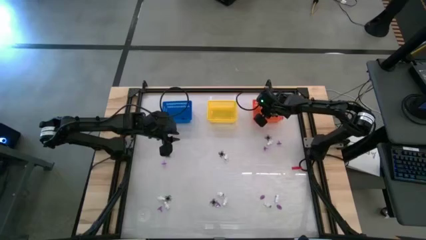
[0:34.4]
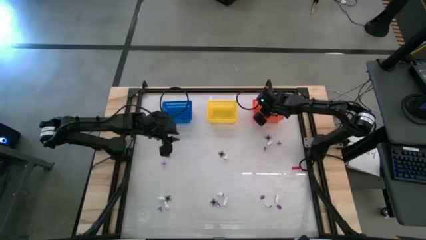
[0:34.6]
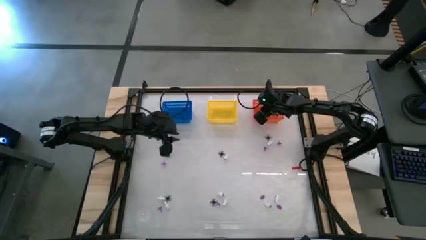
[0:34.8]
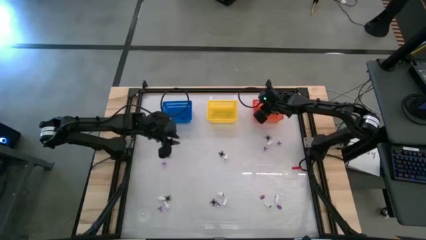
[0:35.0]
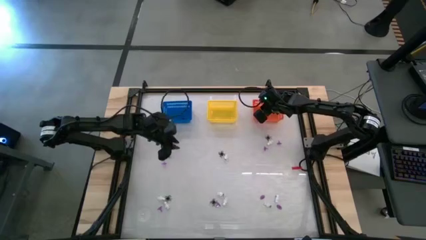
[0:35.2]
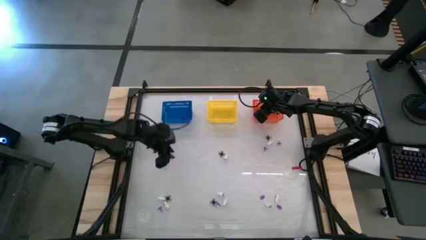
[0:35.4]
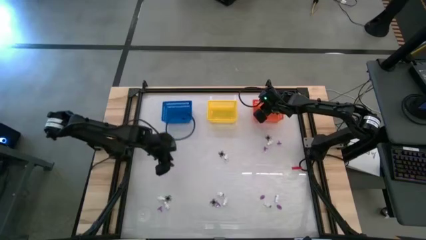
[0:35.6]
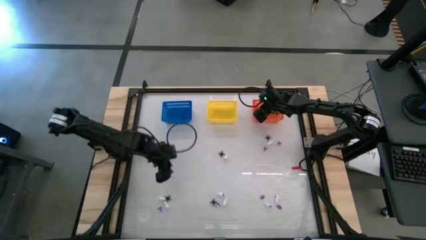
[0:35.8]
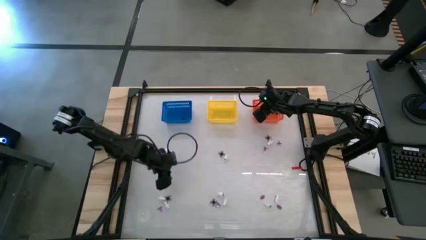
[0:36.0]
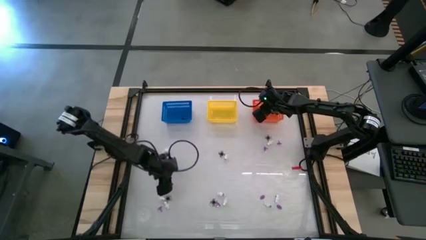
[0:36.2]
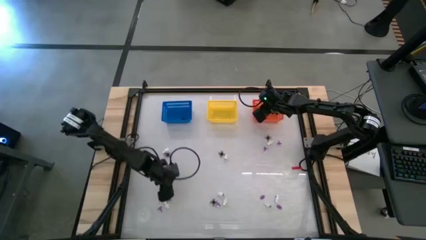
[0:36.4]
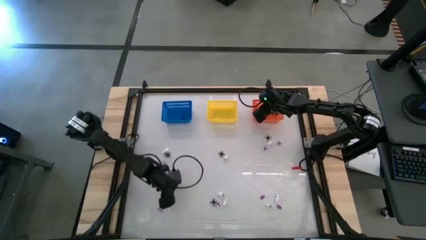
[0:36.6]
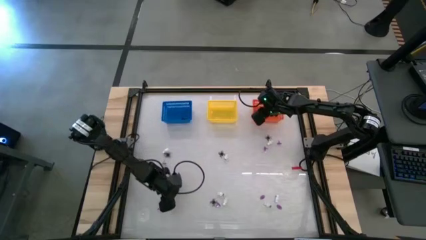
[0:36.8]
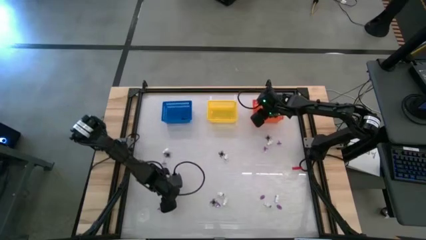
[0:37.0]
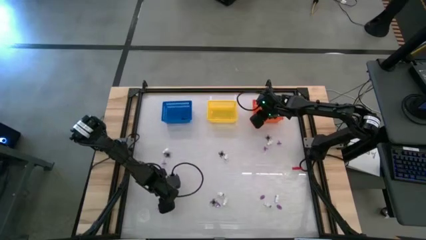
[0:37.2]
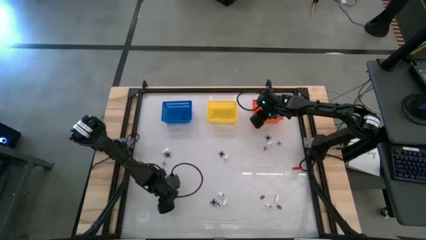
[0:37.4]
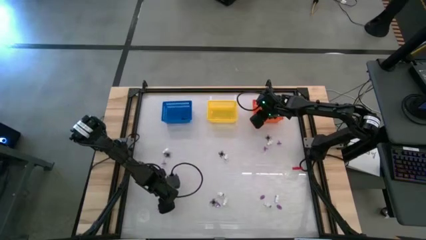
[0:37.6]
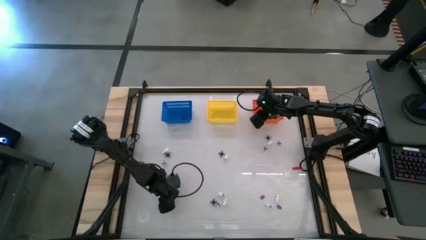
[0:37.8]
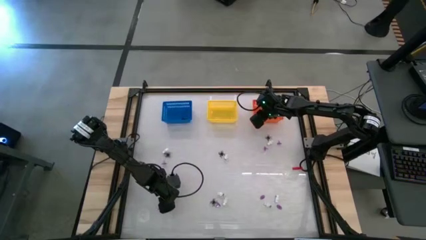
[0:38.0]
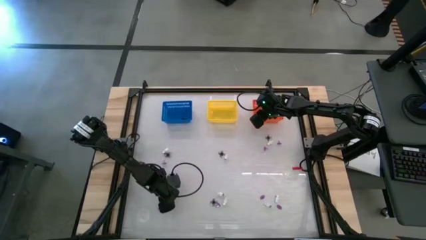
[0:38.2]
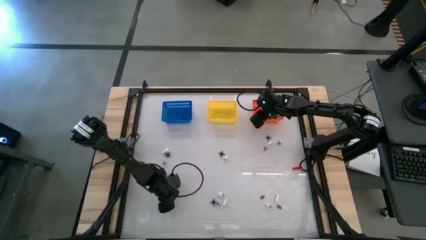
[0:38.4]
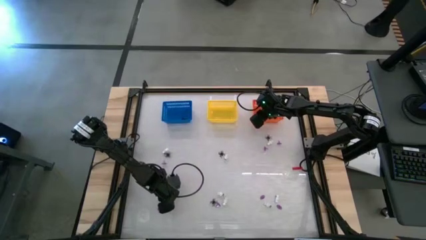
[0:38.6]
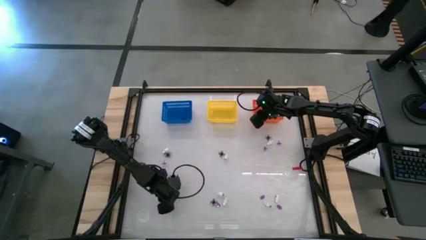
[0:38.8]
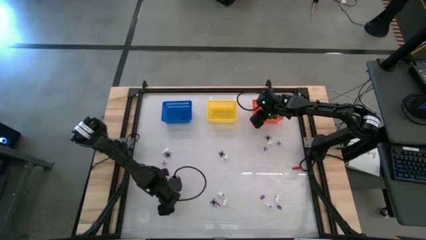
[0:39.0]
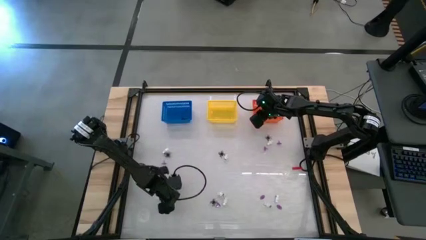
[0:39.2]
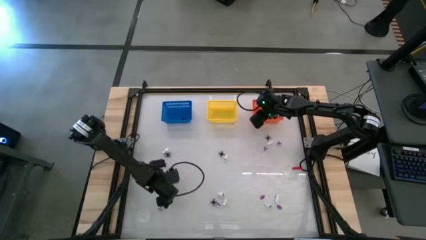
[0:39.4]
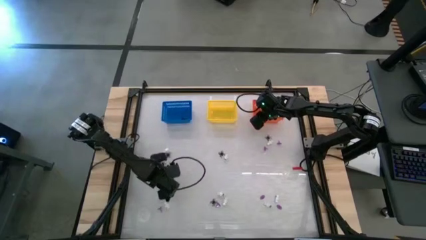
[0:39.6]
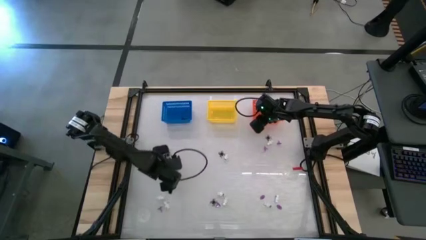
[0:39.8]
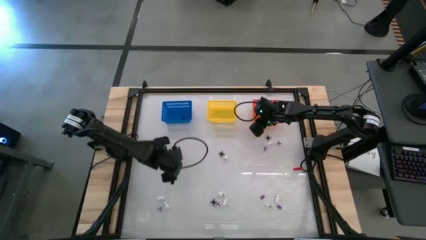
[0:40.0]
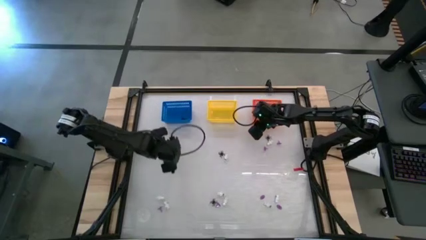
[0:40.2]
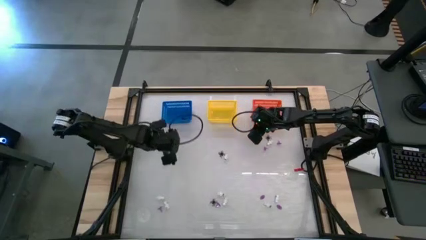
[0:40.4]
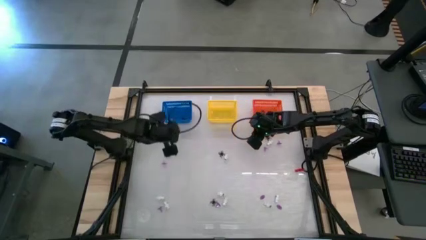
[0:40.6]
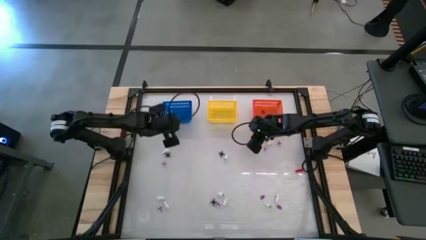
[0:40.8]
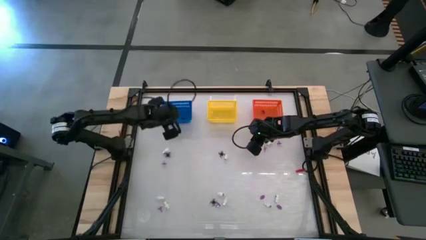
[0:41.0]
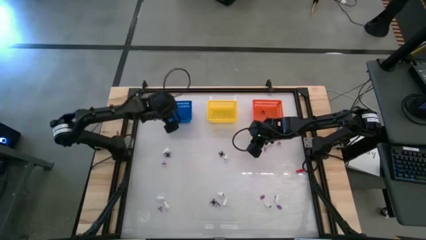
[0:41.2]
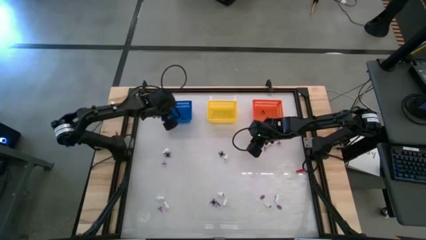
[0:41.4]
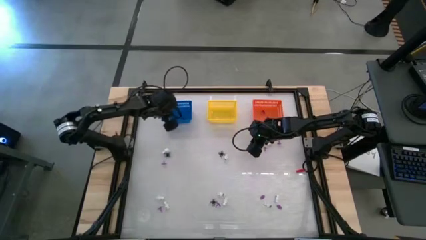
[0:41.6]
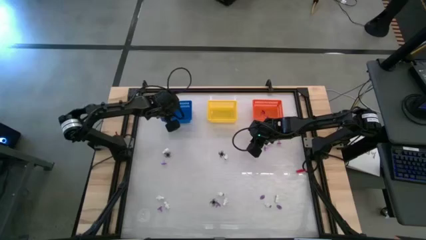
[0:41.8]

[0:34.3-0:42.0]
Task: Sort Halloween decoration
Put the black spider toy into the blue basket

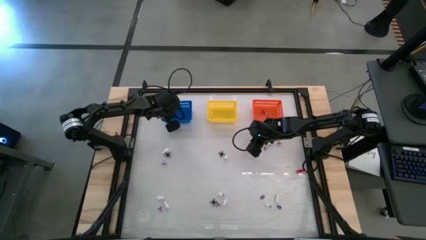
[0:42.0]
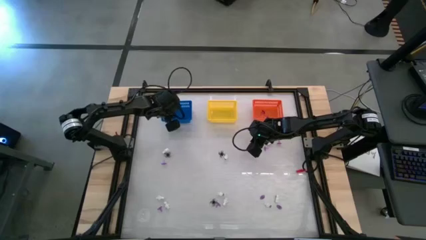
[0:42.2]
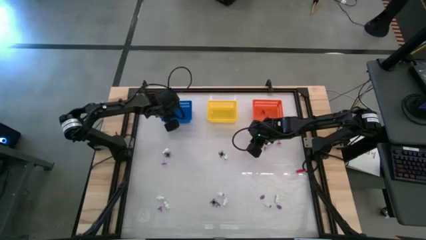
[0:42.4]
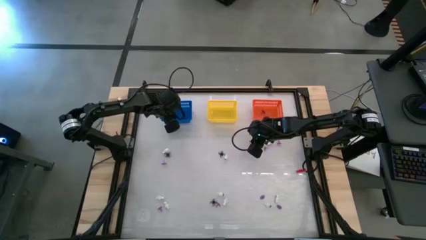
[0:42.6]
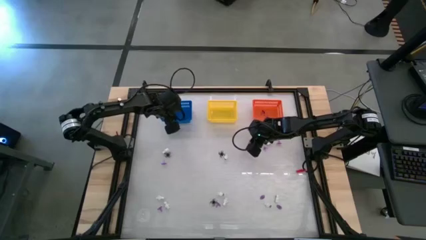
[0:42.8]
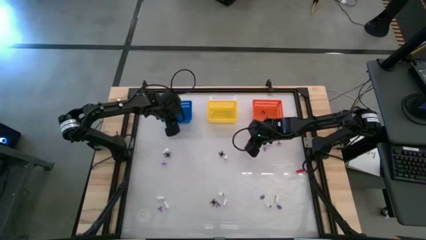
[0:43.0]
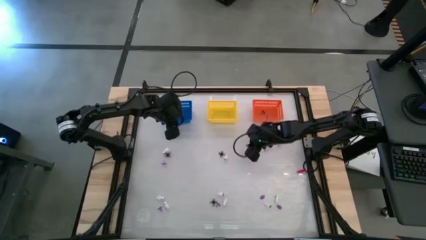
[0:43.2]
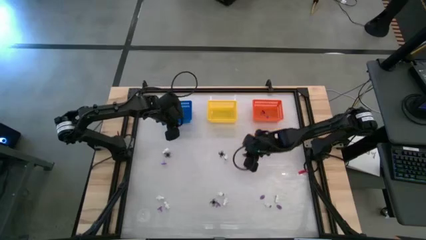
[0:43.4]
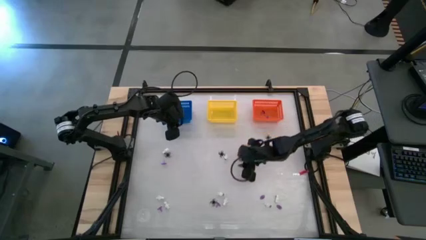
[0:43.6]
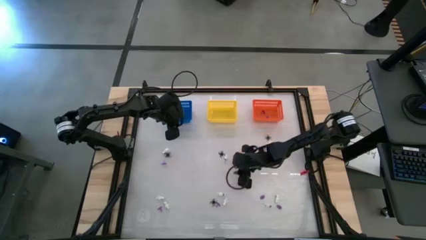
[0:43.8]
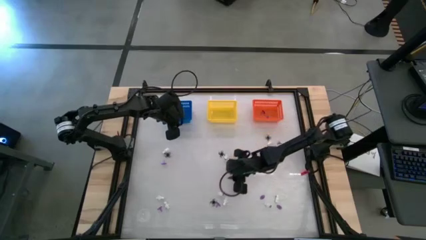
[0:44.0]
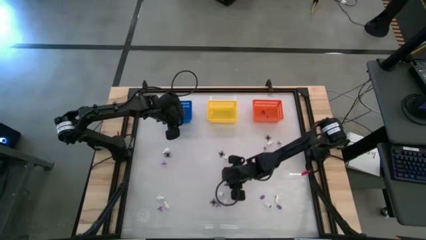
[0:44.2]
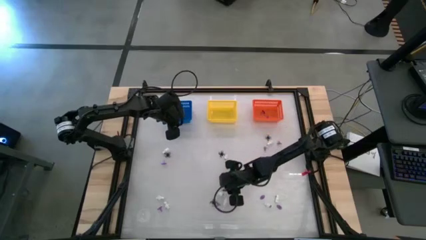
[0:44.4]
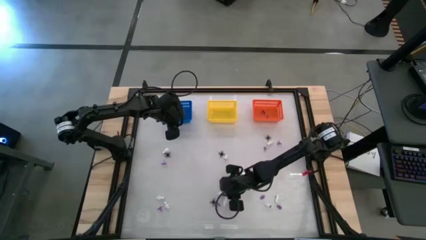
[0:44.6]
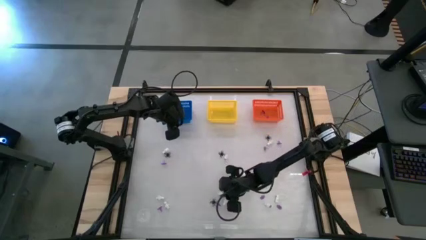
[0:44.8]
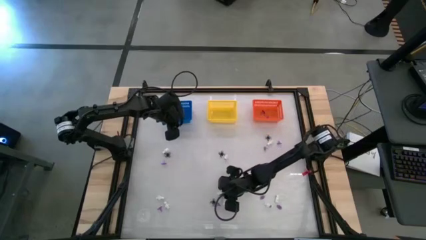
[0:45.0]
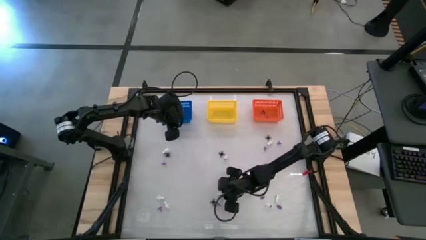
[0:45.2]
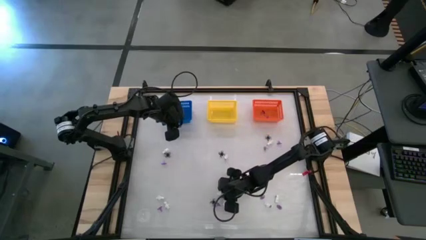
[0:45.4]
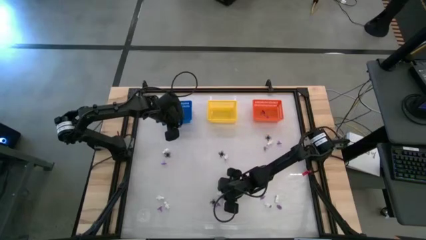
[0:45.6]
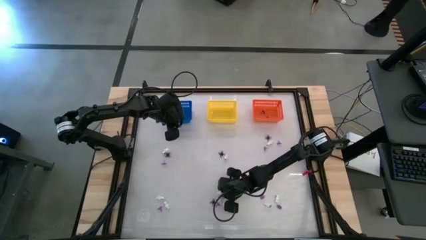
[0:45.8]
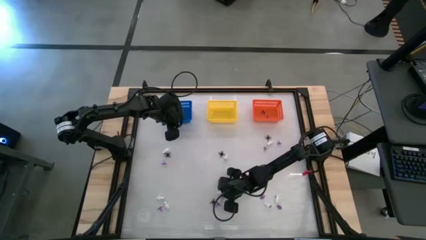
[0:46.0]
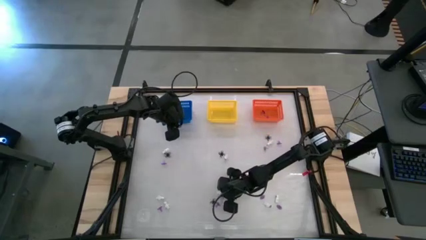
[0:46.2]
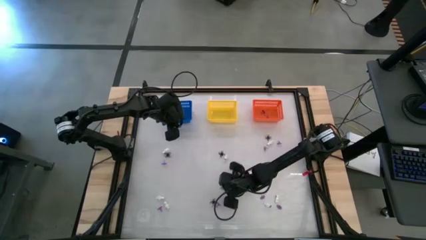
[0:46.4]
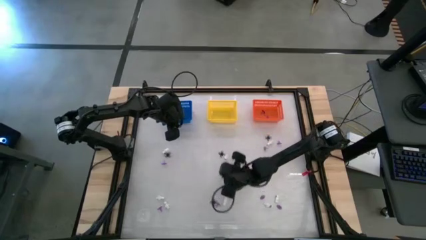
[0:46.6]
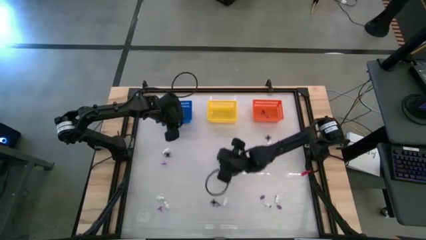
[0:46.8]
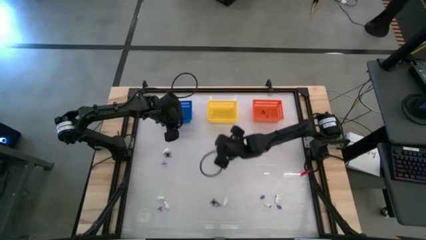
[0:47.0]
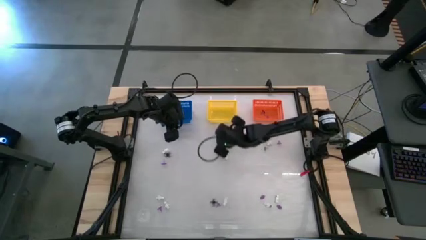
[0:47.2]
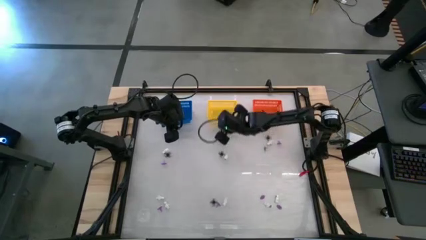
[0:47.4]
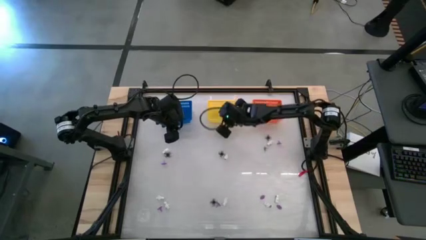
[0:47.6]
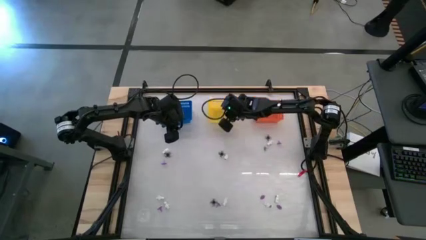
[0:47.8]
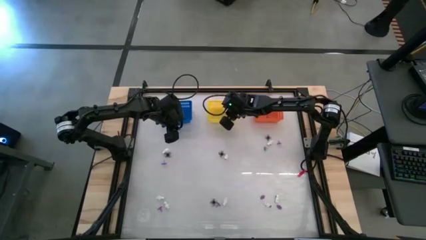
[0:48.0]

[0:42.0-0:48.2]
Put the white skeleton toy into the yellow basket

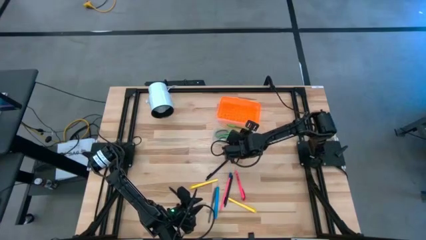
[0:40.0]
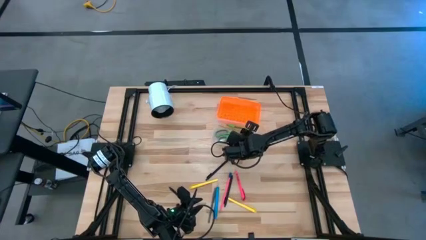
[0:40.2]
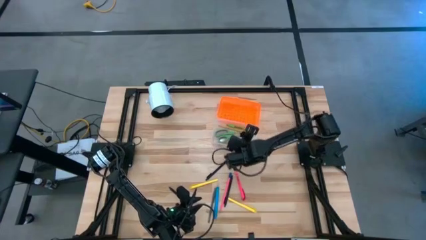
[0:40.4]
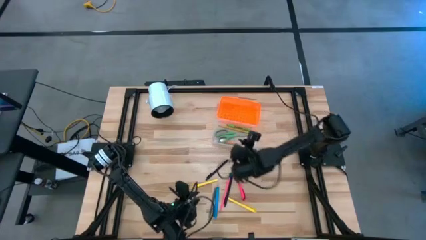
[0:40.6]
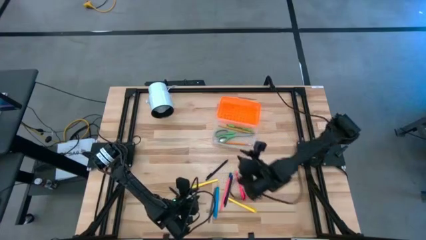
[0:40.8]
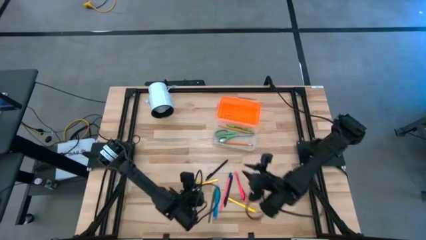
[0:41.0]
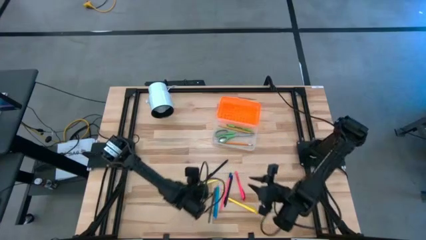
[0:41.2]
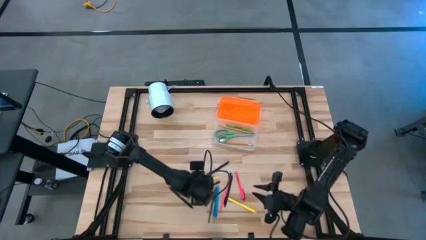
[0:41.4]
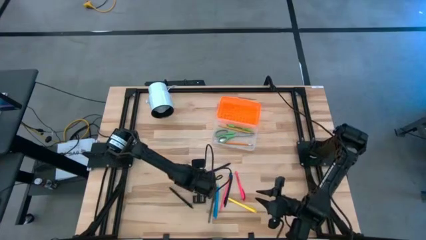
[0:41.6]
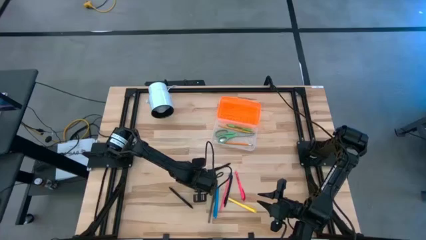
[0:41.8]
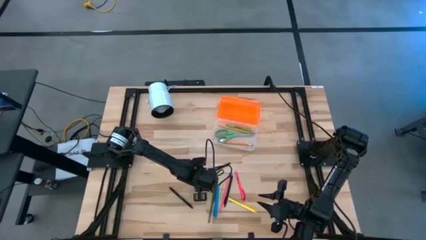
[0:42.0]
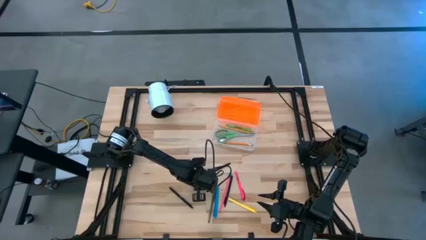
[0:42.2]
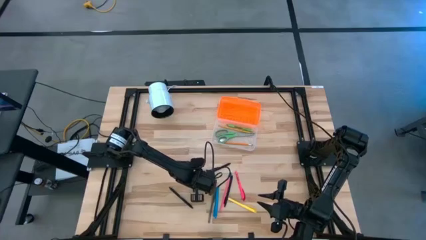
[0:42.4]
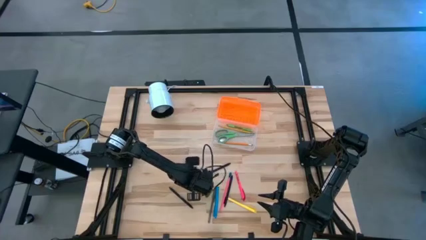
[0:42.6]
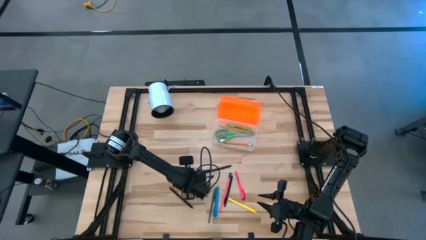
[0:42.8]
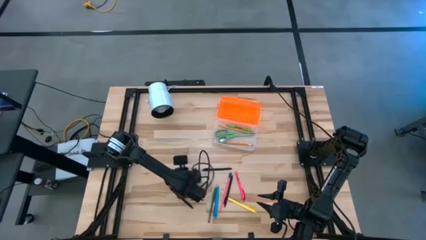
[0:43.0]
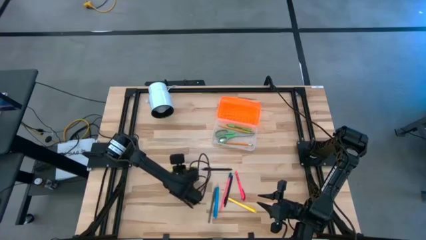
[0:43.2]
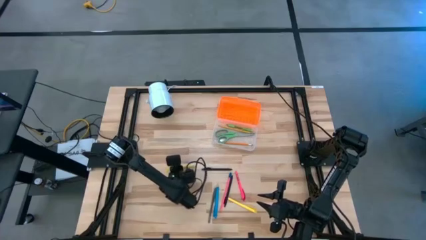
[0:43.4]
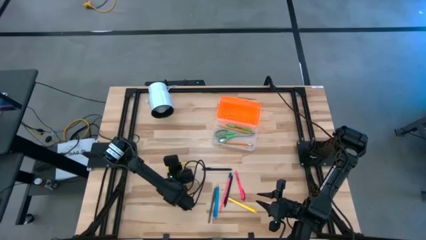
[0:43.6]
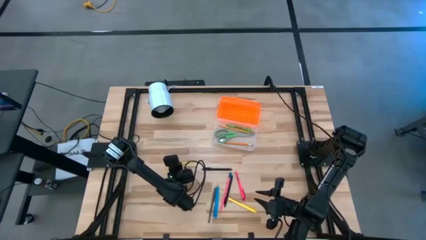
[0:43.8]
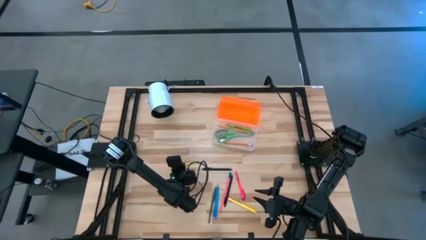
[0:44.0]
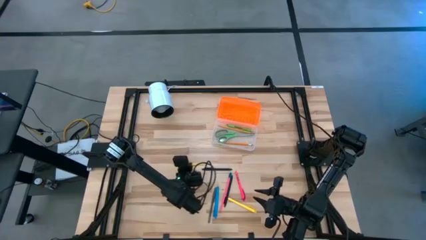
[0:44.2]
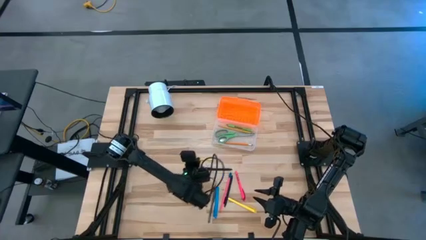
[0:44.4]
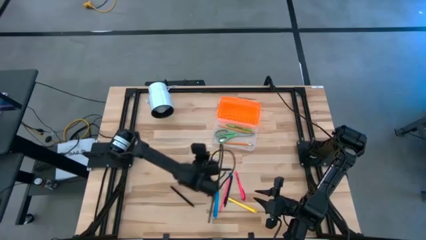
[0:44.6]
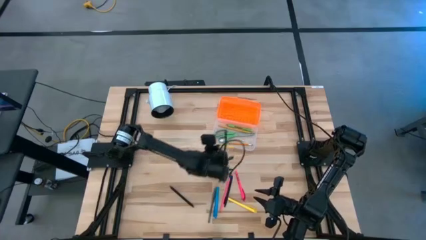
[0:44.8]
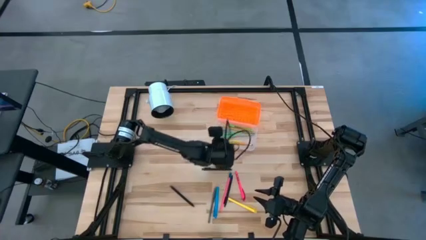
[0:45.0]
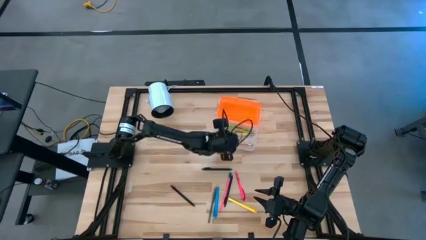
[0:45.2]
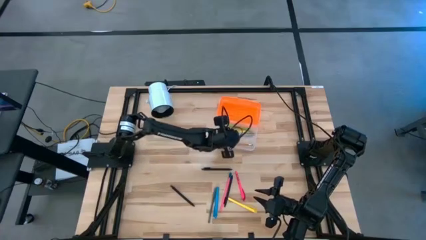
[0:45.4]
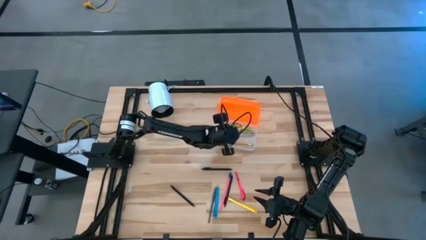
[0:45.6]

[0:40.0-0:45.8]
Task: Pick & place school supplies into a supply box
Put the left yellow pen into the supply box
